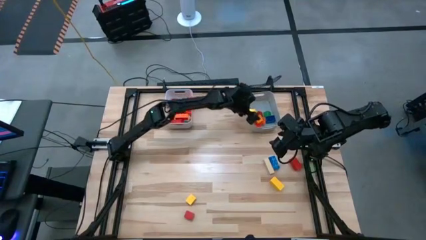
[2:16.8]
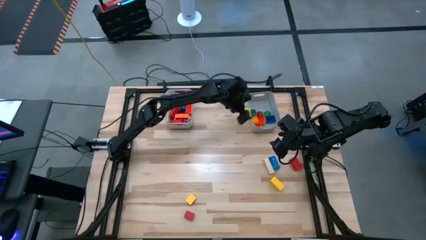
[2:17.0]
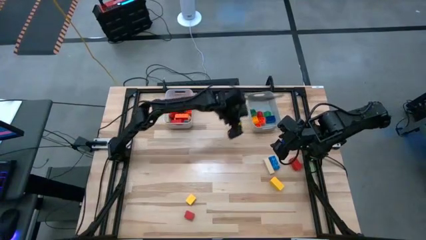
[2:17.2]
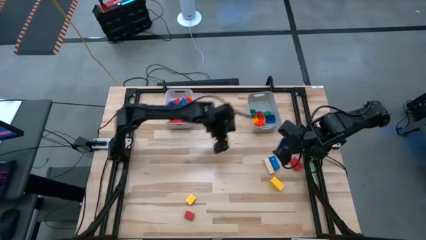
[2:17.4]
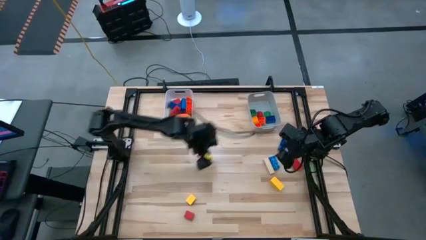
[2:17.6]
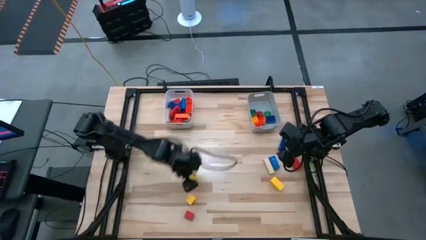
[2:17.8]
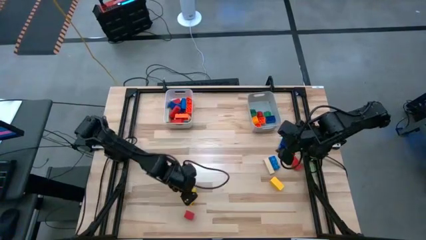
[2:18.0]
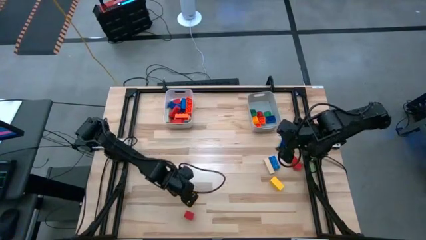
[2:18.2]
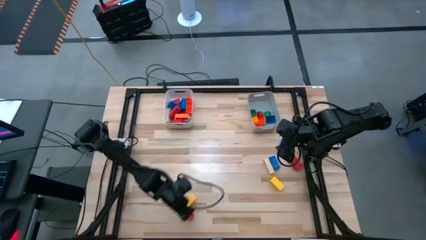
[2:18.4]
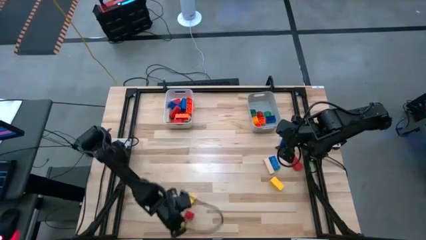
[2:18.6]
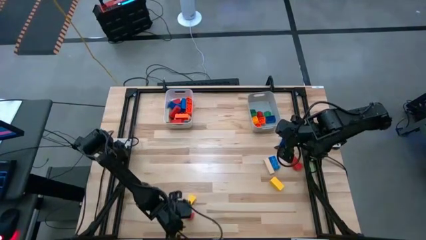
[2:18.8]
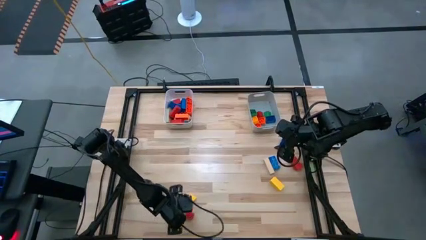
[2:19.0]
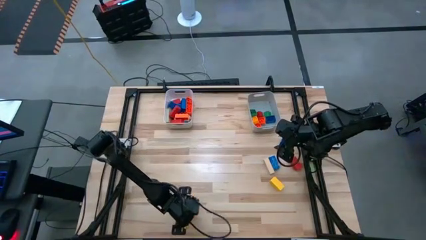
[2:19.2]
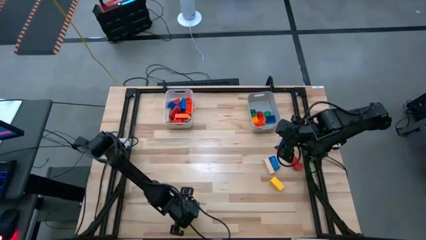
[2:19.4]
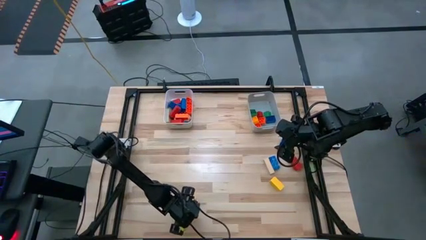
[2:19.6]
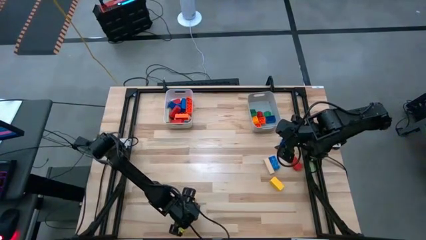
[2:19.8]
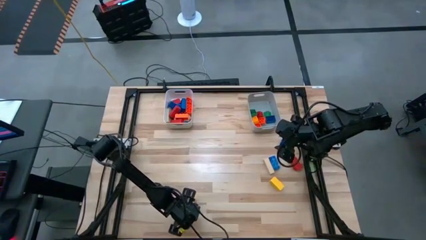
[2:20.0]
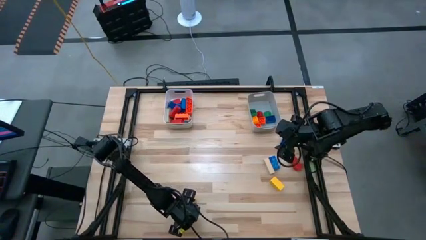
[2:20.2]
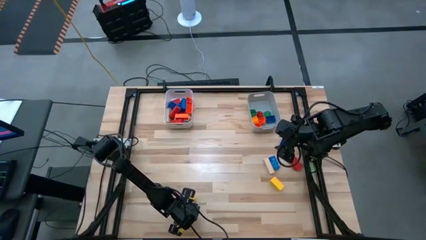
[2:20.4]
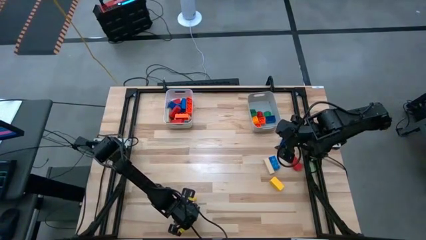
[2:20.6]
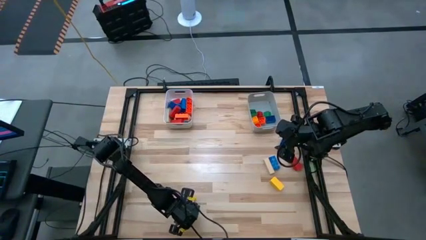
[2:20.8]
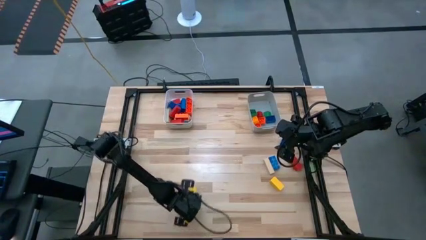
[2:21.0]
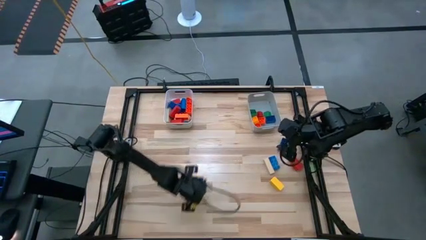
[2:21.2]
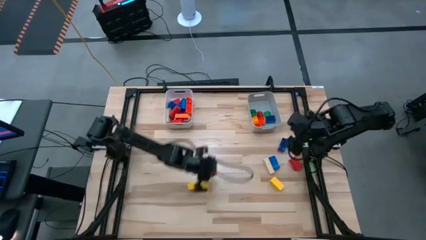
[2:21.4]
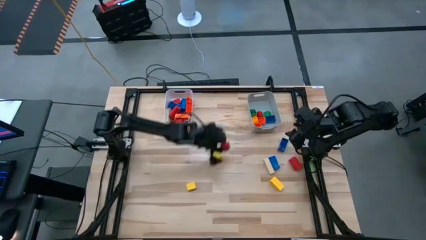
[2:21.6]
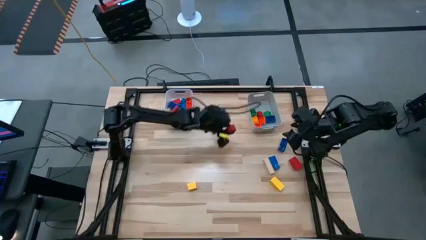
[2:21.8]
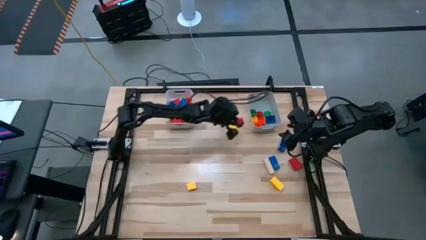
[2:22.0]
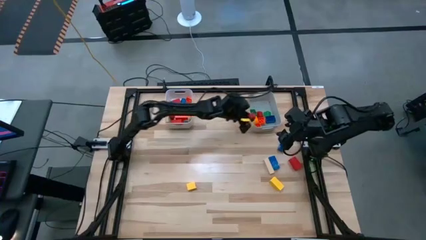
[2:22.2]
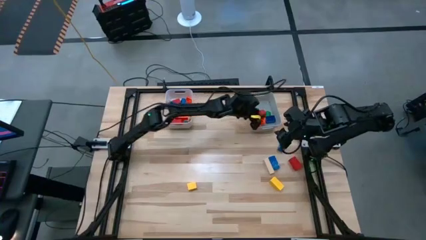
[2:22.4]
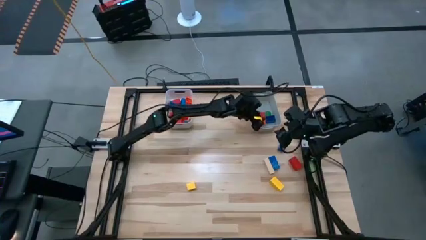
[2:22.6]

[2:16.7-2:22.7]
Task: Sort blocks by size
Put the red triangle wooden block into the gray bin

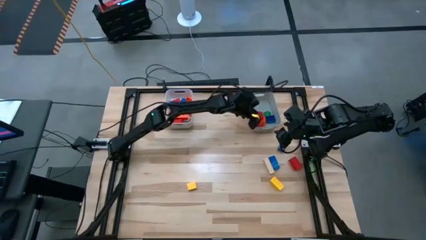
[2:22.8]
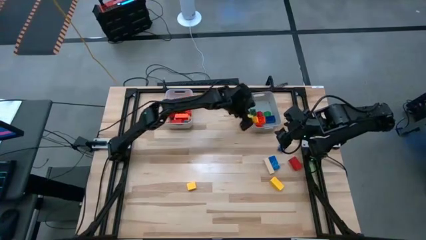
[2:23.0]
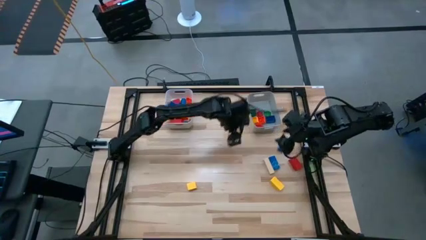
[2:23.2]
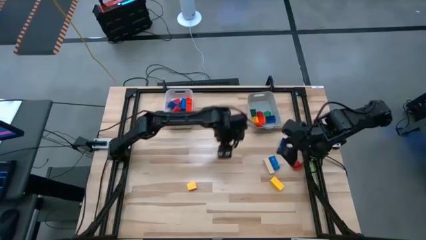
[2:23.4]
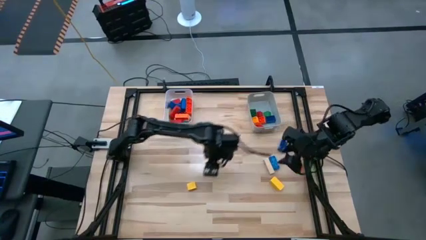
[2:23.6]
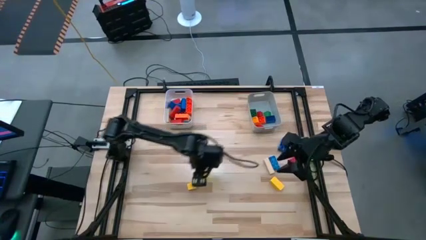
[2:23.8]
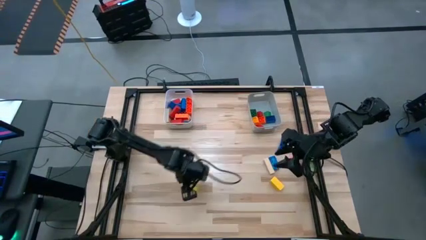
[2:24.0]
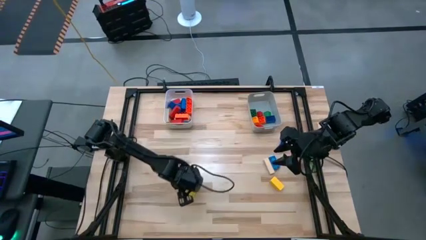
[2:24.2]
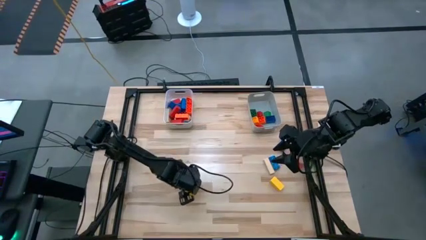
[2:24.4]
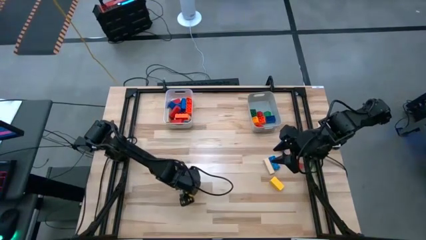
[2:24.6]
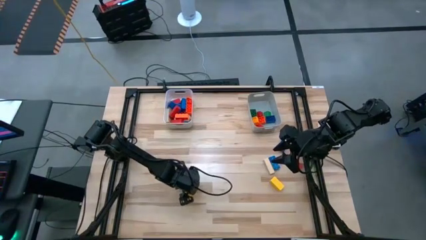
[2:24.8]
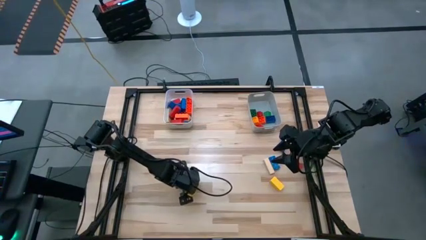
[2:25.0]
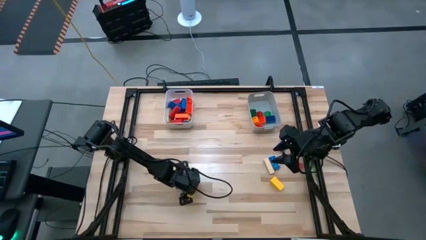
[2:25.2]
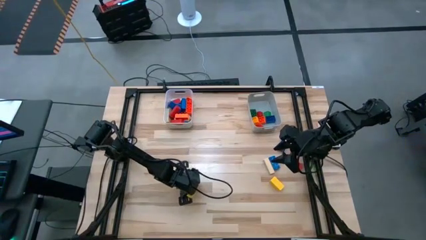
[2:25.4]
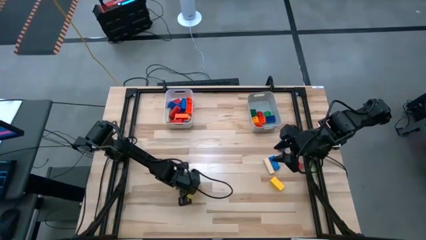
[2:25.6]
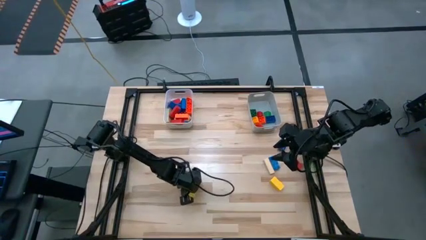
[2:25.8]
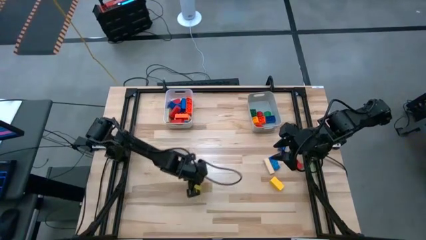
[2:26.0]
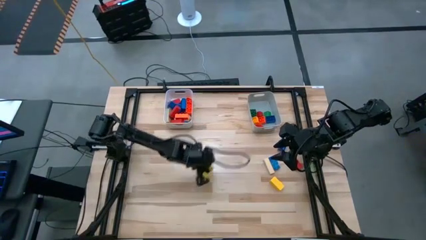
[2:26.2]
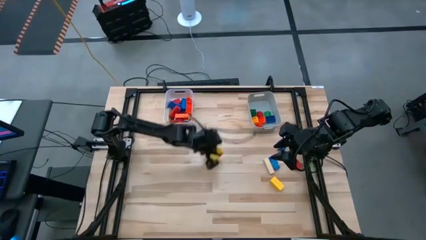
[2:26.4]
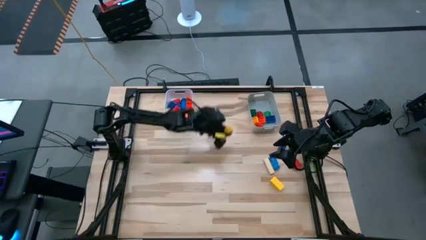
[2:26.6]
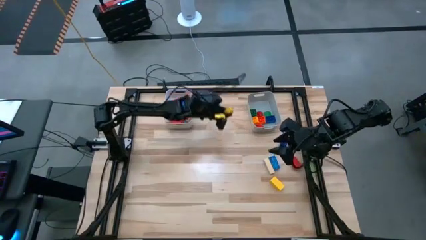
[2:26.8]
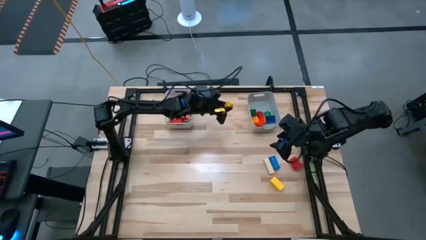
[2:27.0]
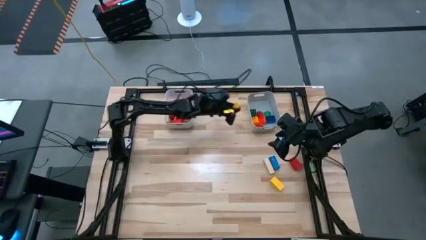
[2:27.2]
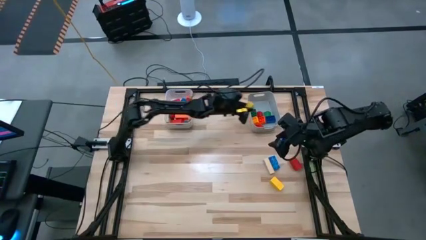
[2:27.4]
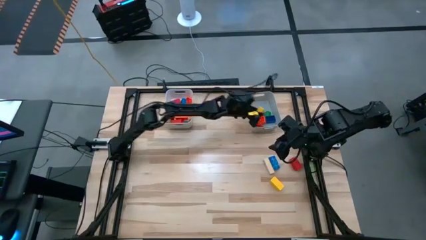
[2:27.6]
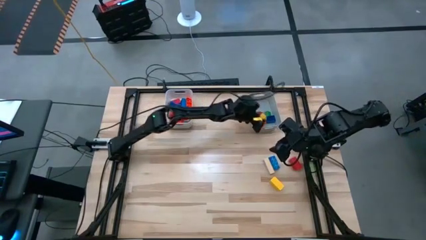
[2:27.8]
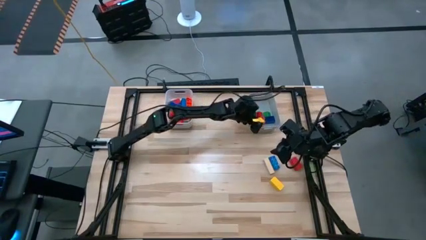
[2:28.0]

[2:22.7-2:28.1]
Put the yellow semicircle wooden block into the gray bin

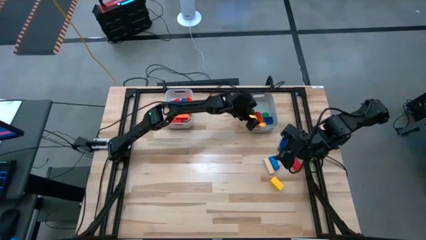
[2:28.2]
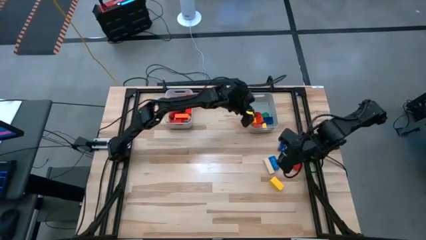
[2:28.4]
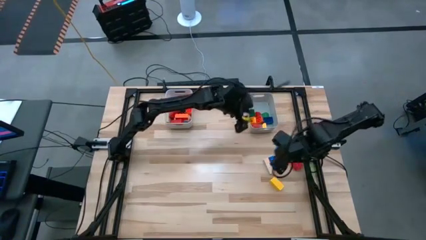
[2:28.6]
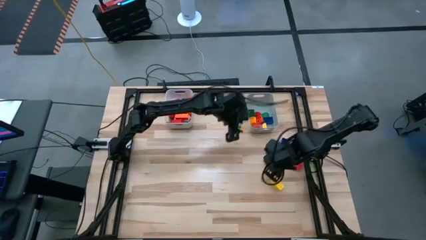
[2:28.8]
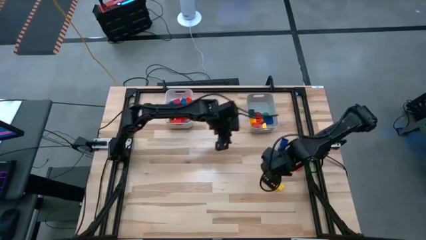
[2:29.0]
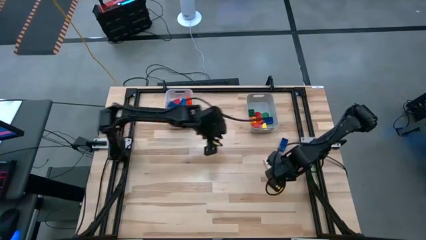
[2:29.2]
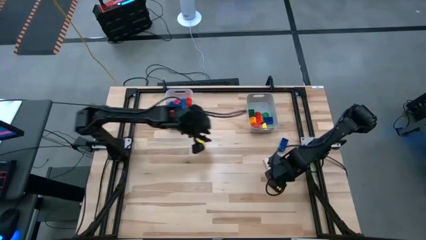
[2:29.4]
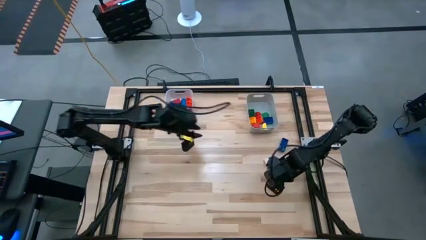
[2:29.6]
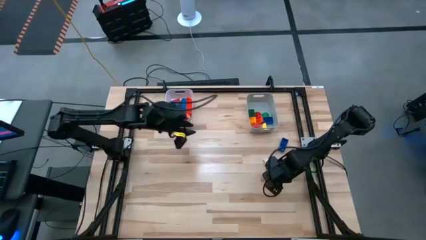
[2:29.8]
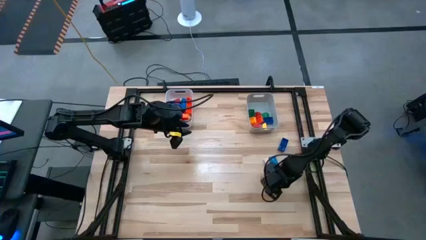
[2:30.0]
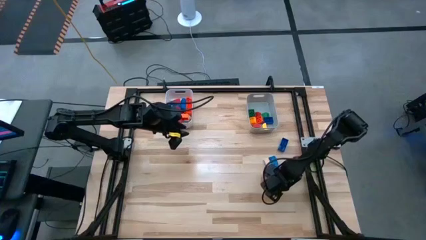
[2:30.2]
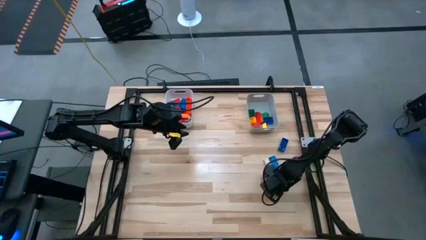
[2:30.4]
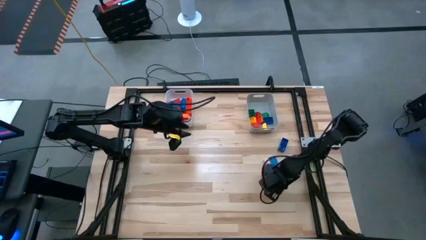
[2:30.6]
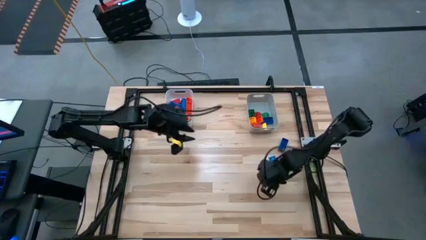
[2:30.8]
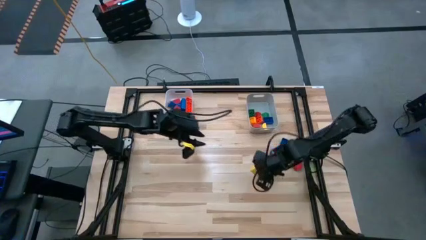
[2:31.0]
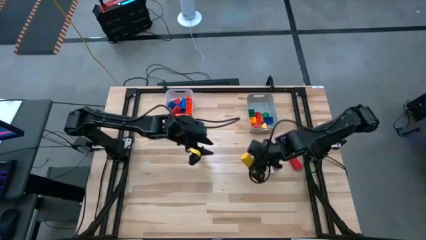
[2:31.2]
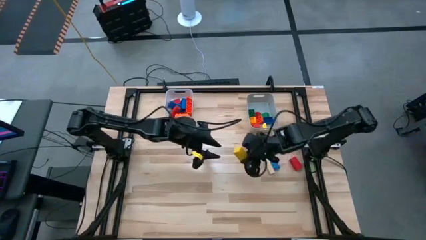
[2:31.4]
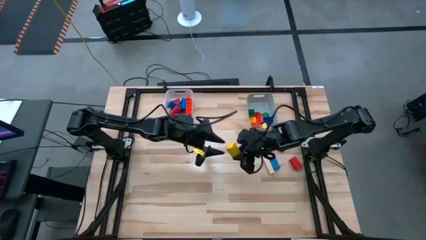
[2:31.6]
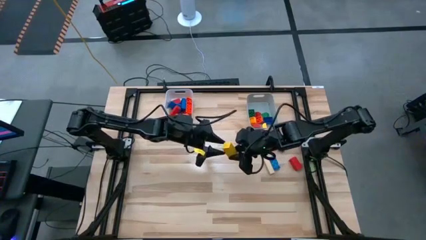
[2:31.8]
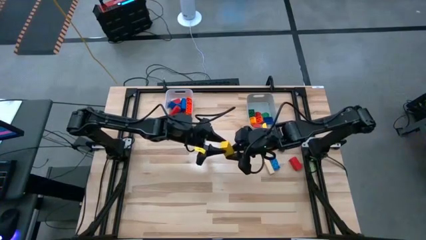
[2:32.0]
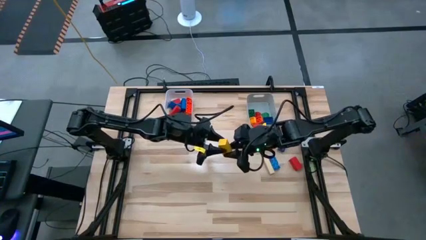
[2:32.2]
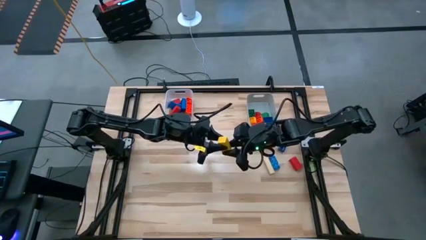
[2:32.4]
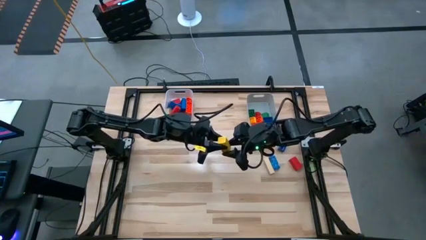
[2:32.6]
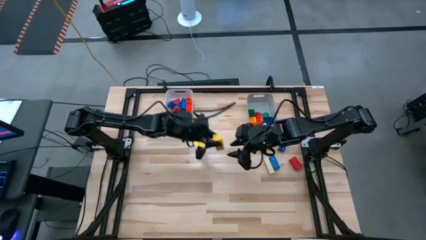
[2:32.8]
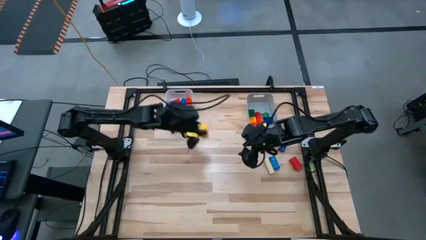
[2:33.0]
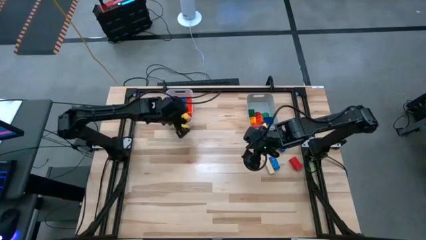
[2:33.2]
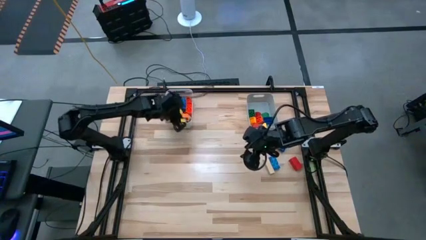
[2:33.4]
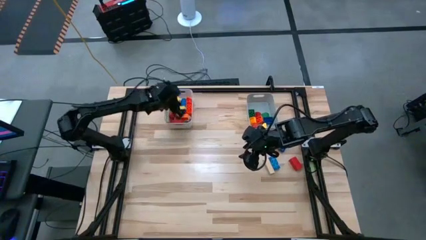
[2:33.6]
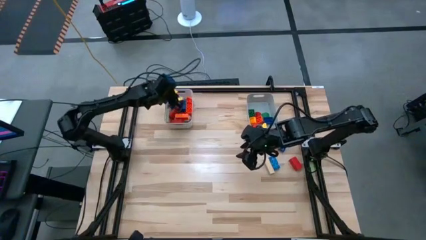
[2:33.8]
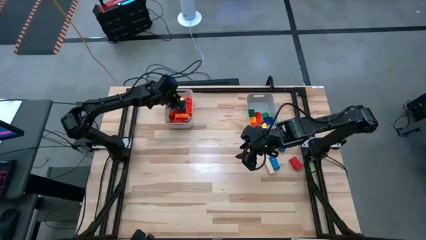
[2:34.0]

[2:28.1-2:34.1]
Put the yellow rectangle wooden block into the white bin
